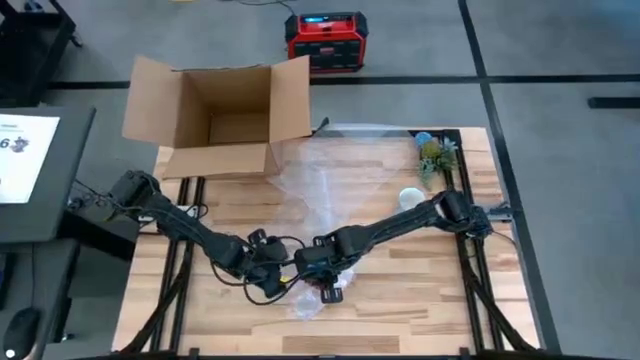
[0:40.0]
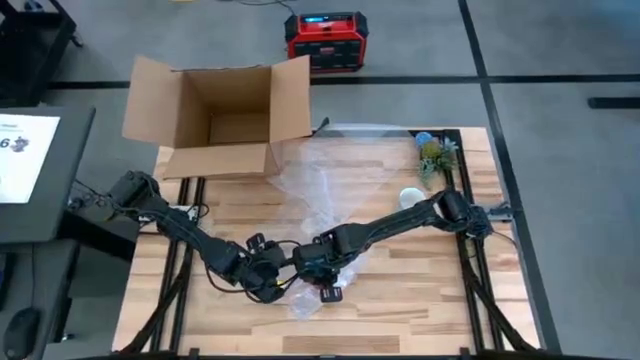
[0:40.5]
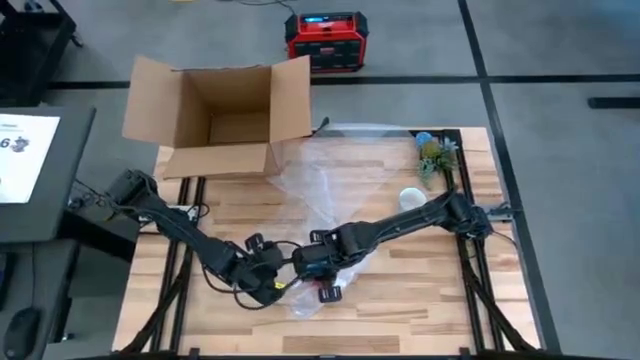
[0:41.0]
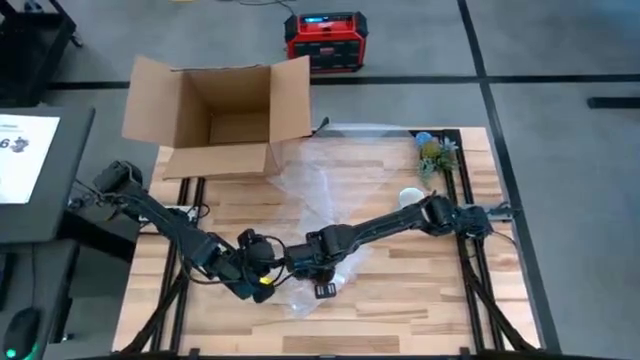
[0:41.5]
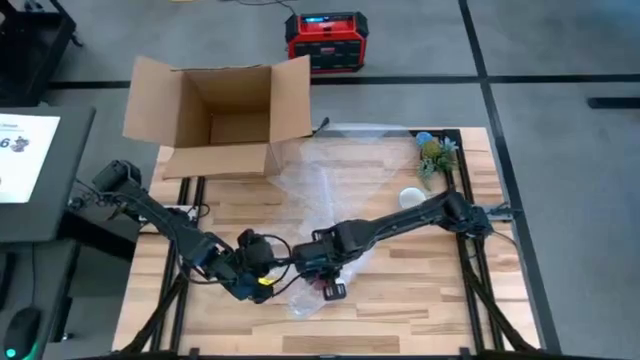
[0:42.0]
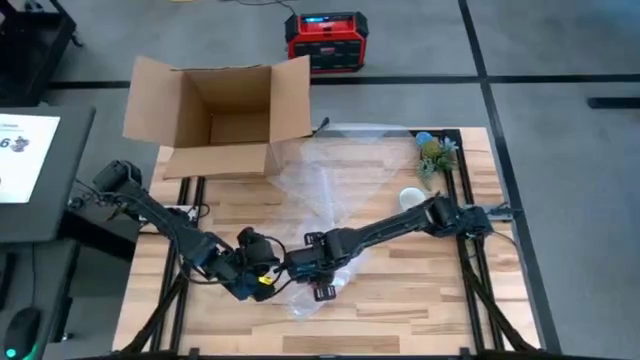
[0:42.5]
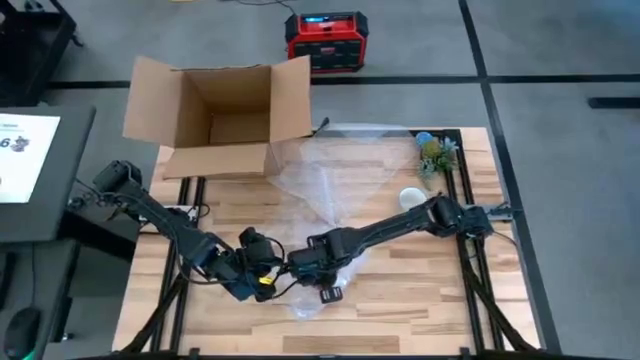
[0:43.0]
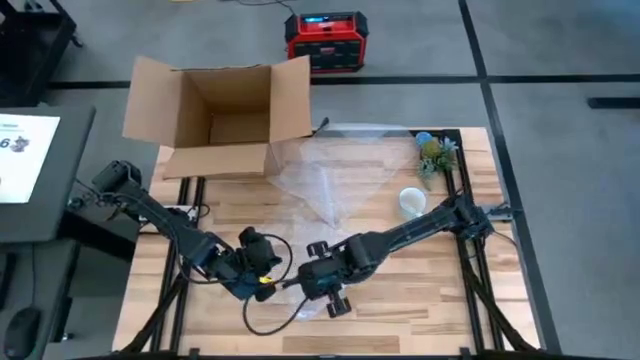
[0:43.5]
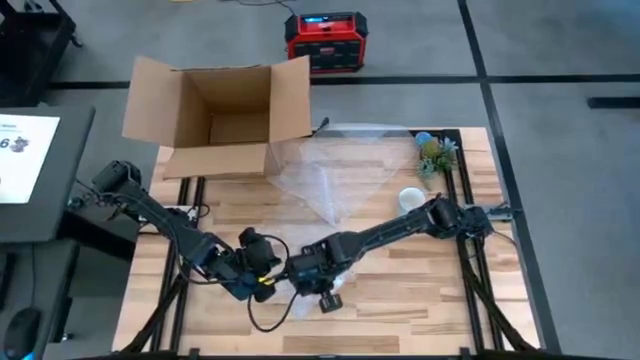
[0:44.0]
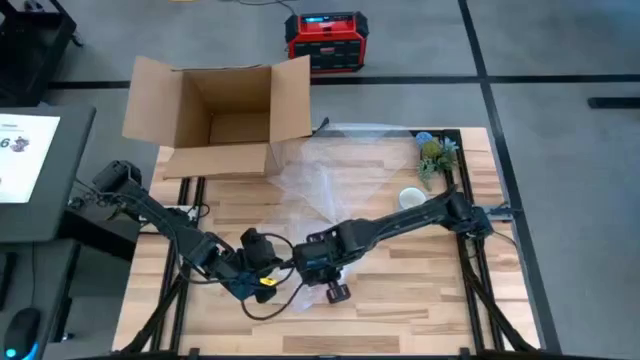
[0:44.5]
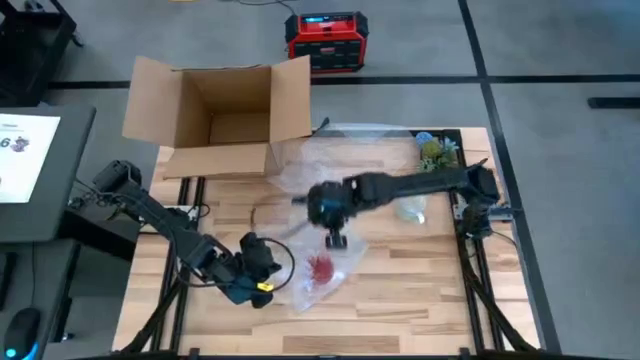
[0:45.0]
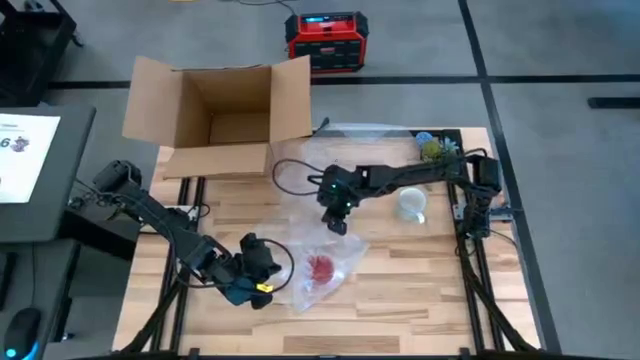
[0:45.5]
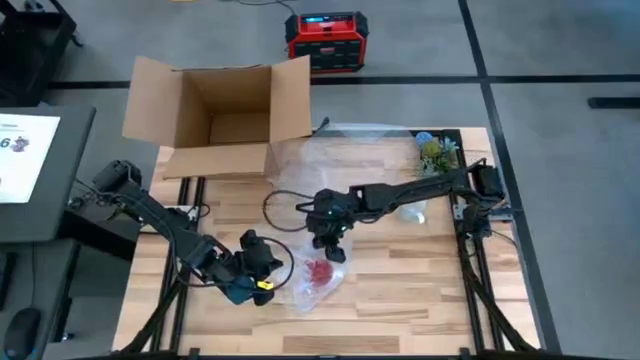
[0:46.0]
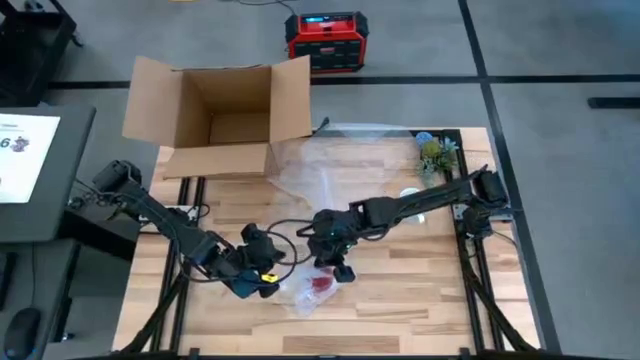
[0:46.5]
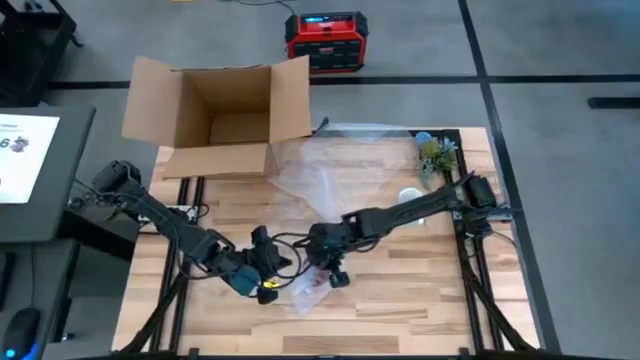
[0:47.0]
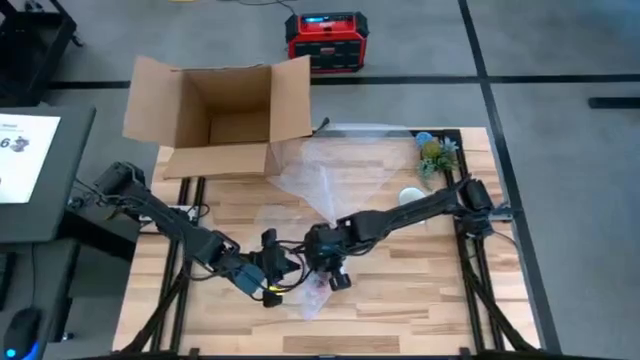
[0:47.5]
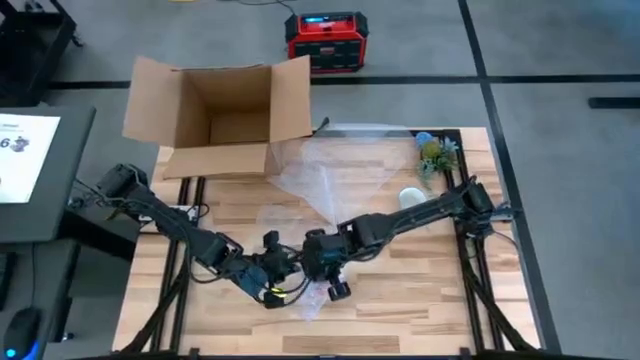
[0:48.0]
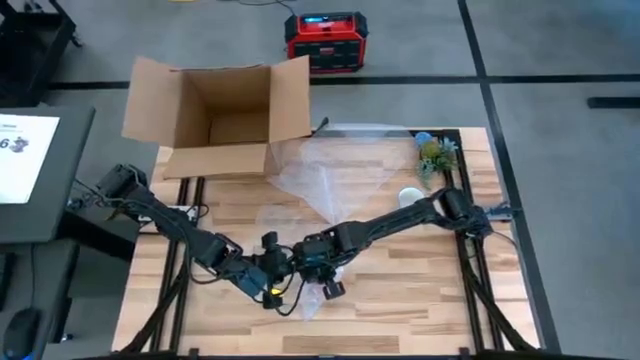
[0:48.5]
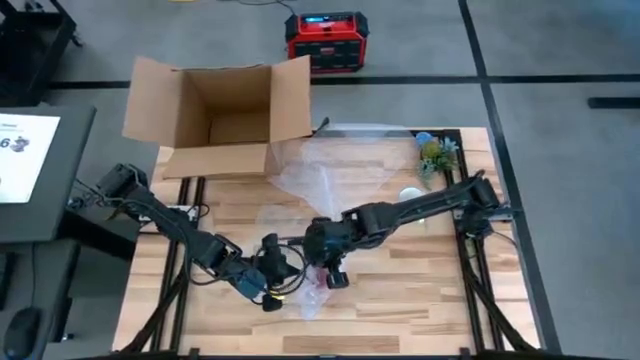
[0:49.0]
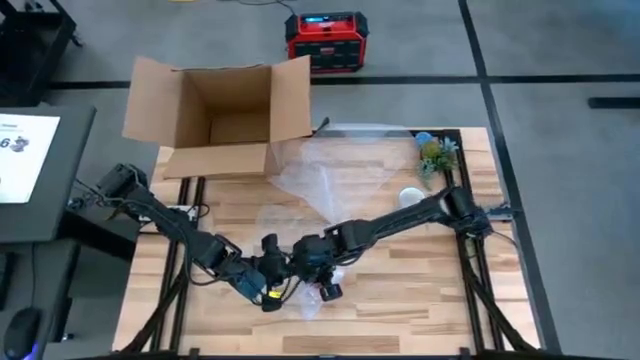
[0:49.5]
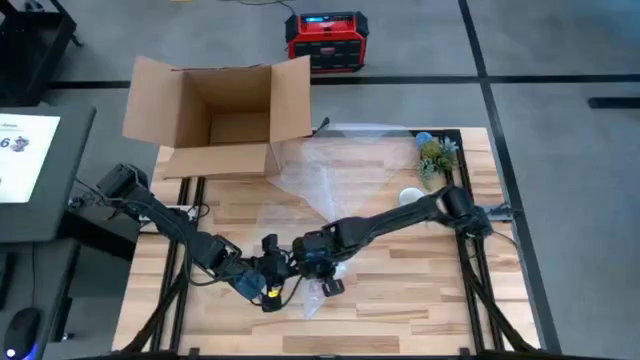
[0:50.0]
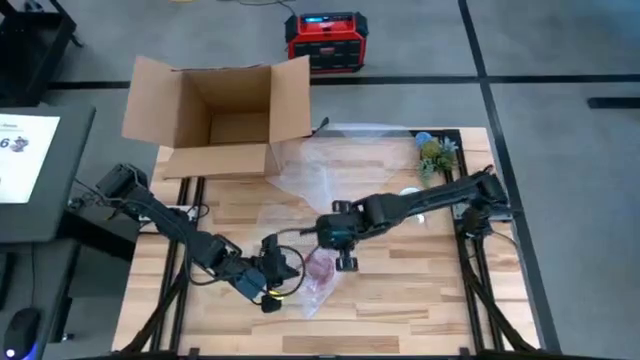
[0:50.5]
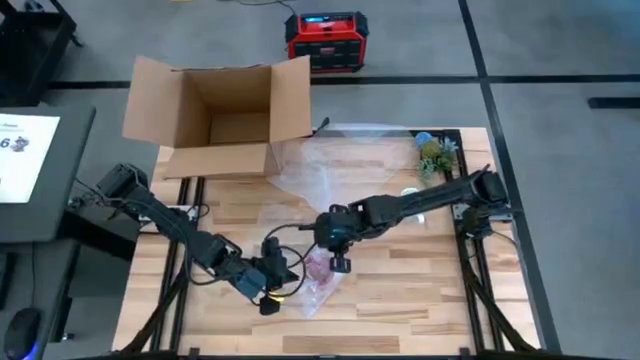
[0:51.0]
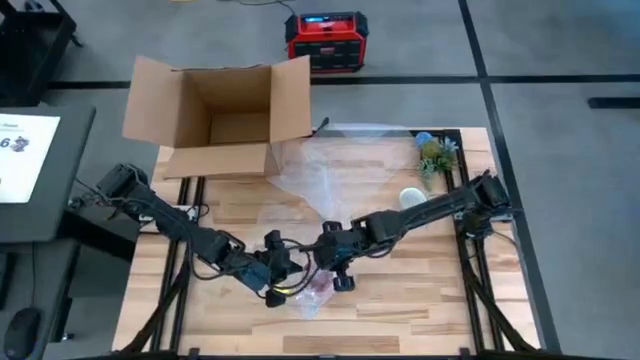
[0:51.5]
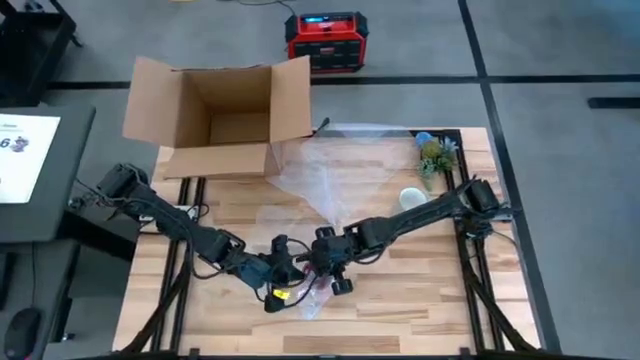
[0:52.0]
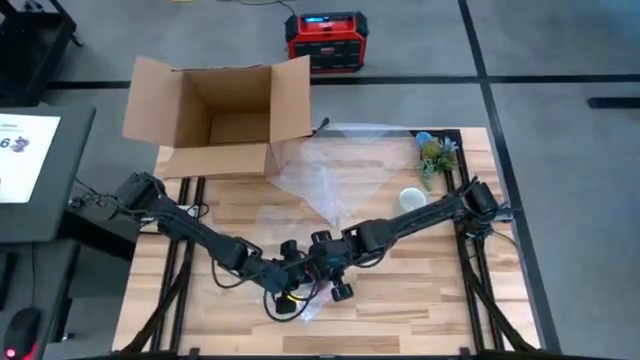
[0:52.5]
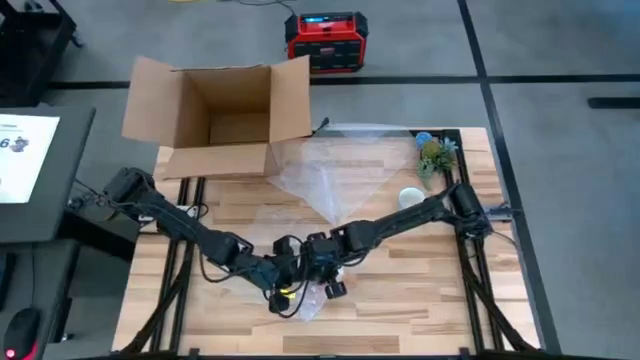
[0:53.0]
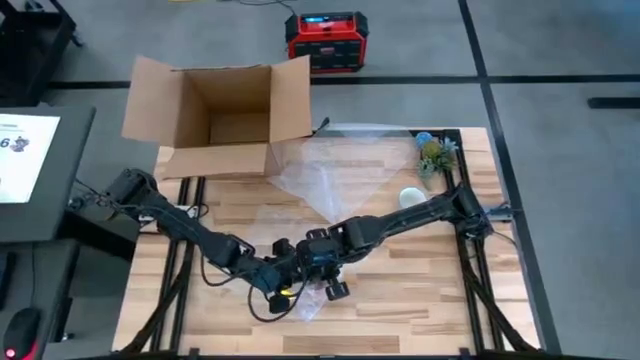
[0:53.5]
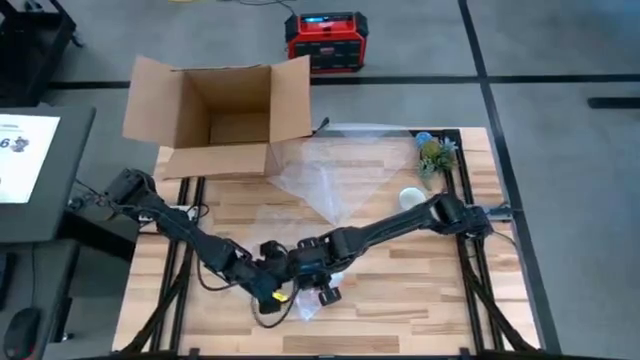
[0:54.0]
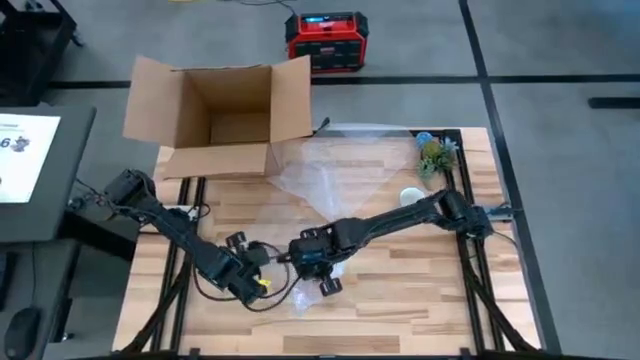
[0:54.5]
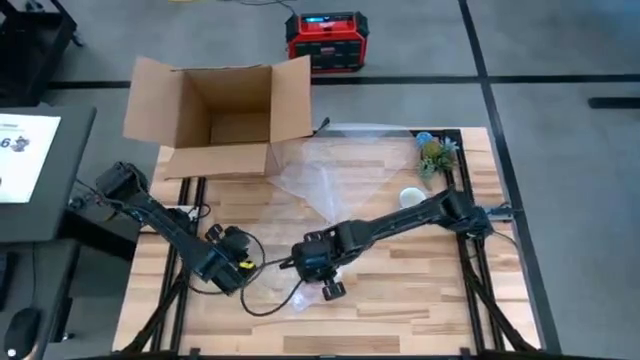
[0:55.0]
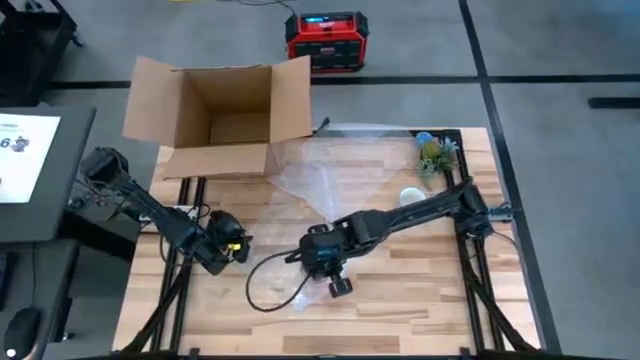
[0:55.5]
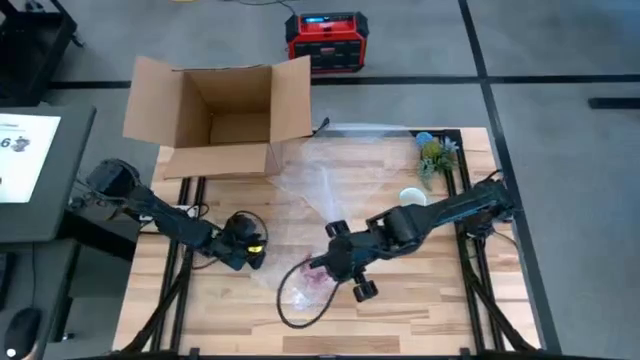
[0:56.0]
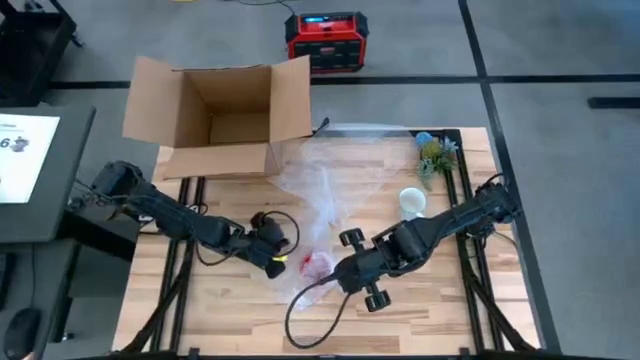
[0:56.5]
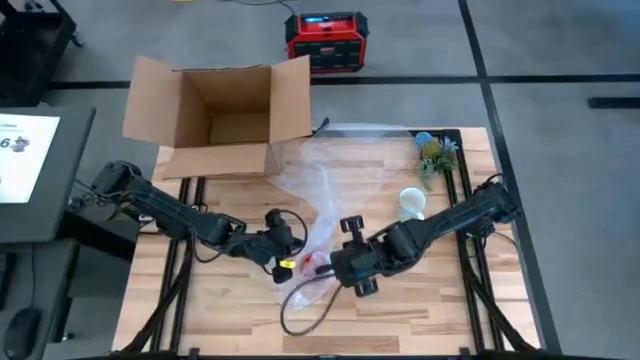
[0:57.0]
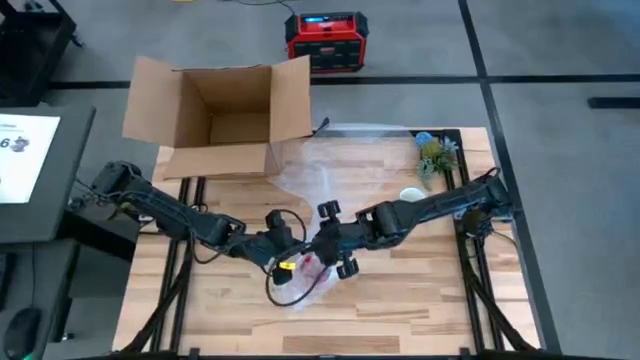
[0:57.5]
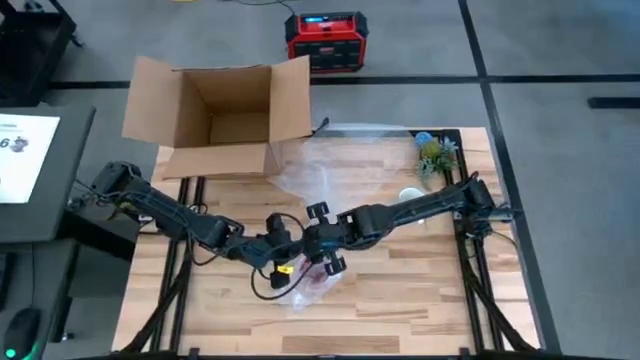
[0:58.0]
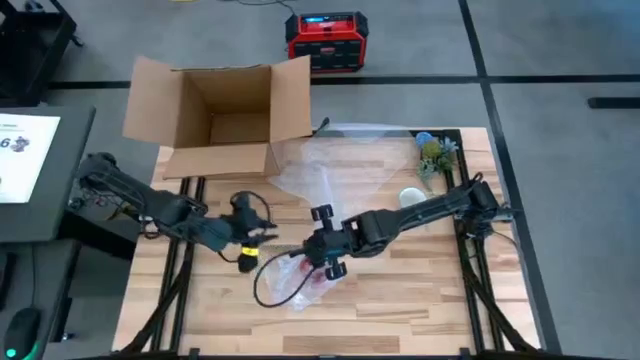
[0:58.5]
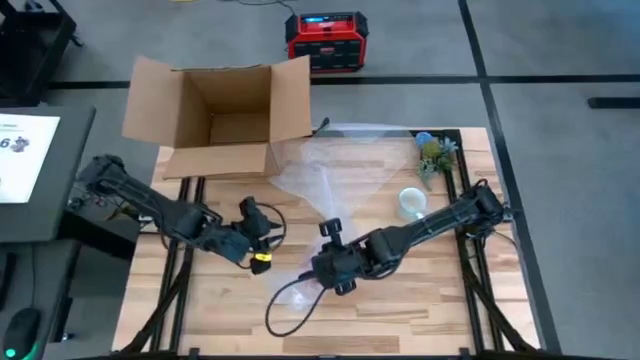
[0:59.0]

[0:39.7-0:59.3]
Task: wrap mug
Wrap the red mug with bubble wrap

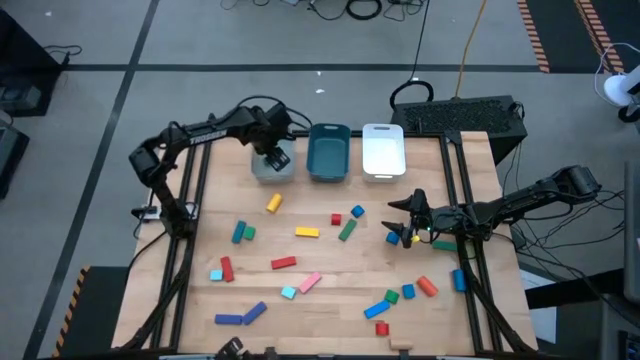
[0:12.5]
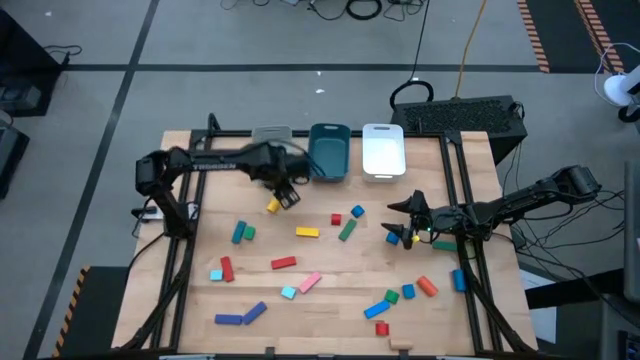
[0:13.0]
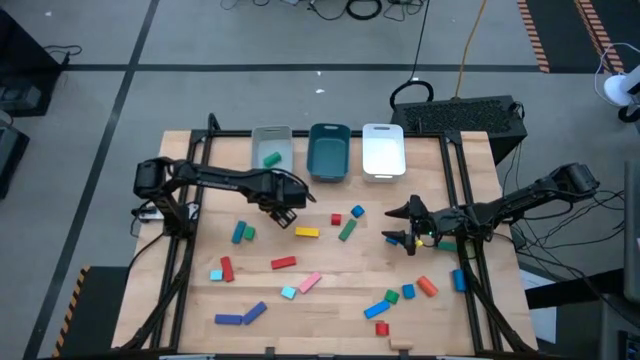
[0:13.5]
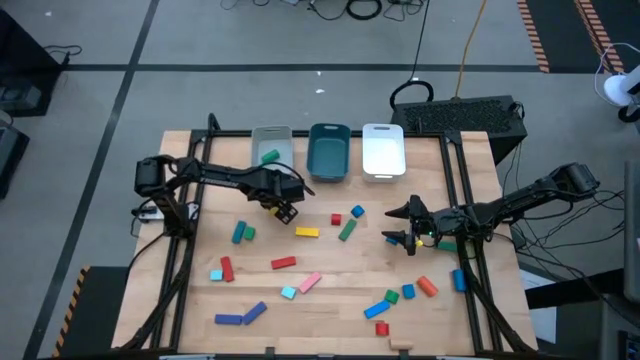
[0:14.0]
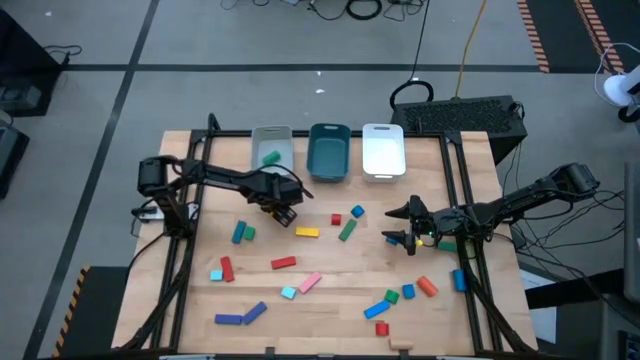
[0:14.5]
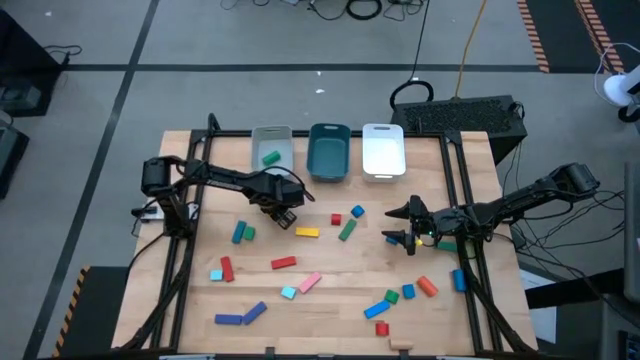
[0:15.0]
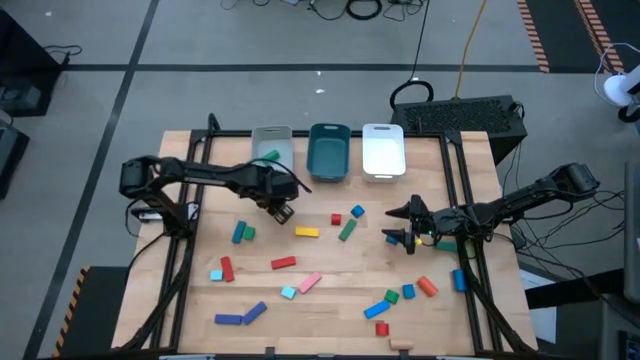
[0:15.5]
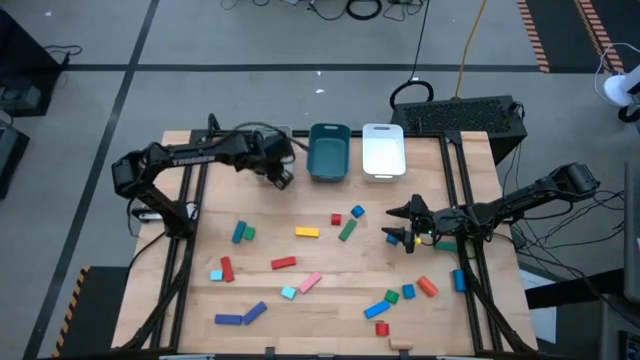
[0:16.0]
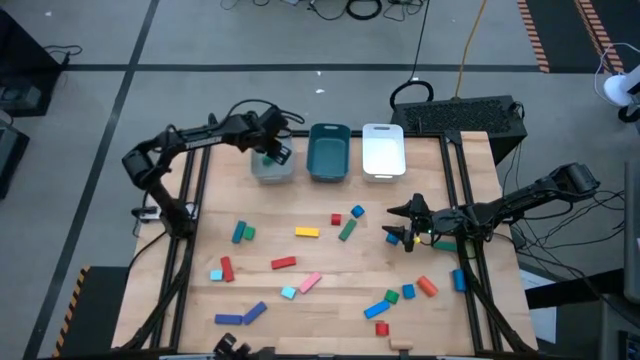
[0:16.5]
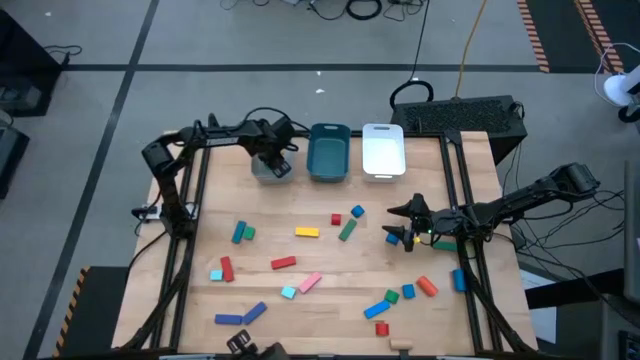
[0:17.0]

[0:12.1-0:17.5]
Task: Sort blocks by size
Put the yellow cylinder block into the gray bin
